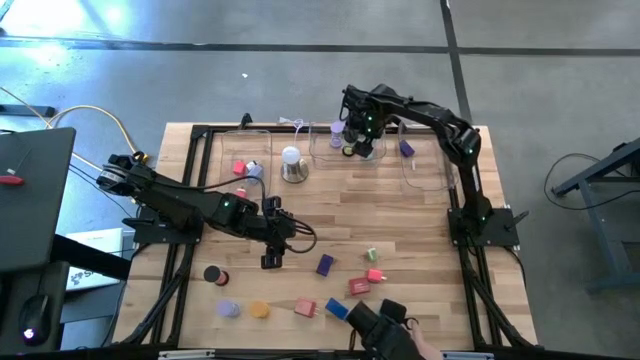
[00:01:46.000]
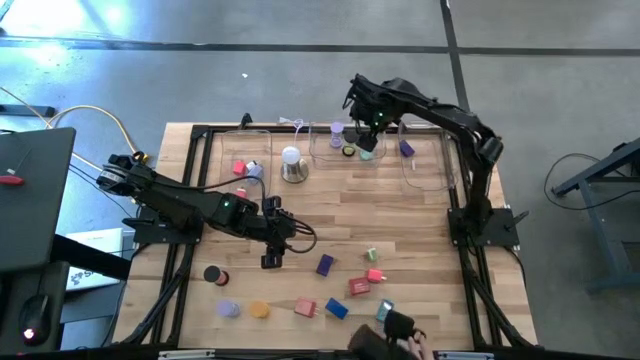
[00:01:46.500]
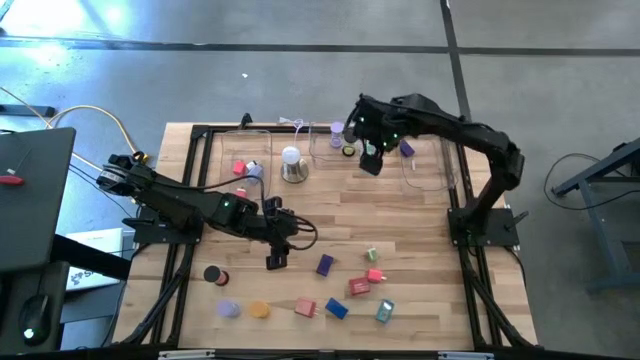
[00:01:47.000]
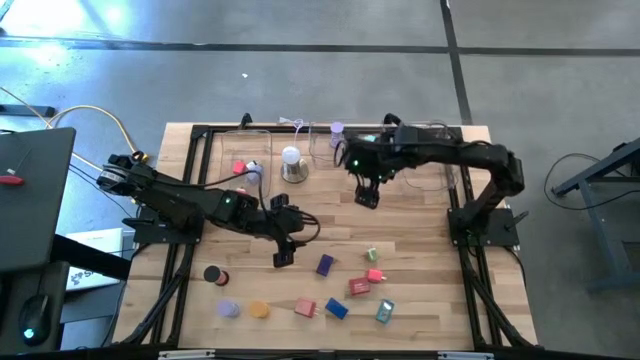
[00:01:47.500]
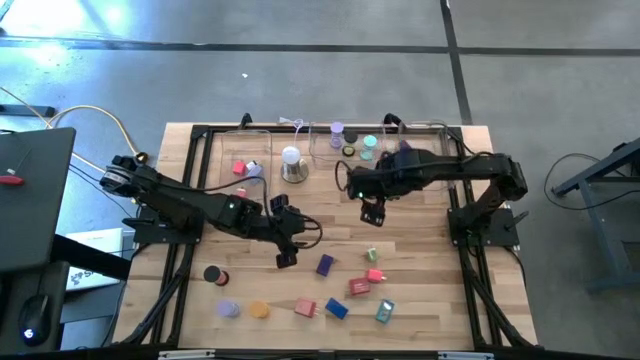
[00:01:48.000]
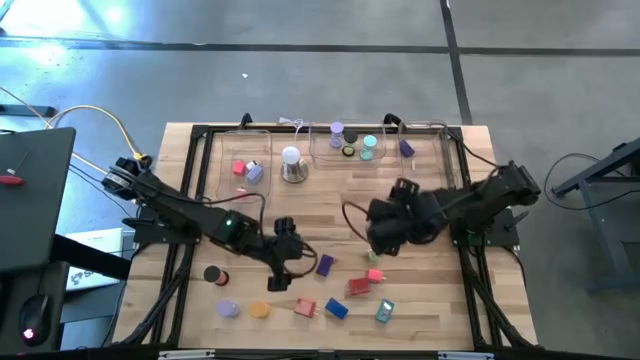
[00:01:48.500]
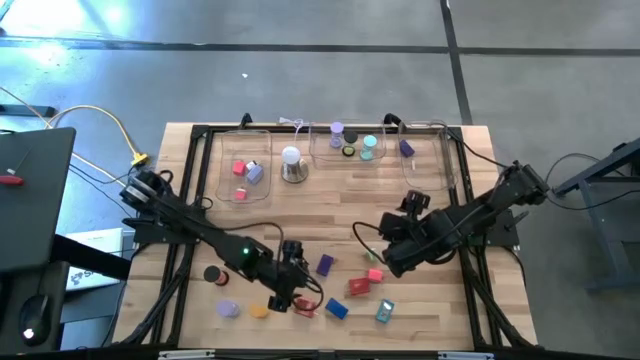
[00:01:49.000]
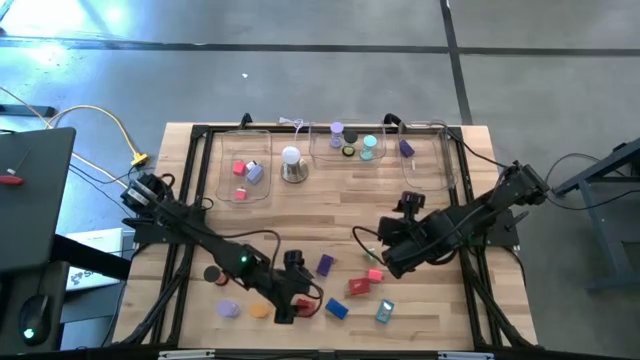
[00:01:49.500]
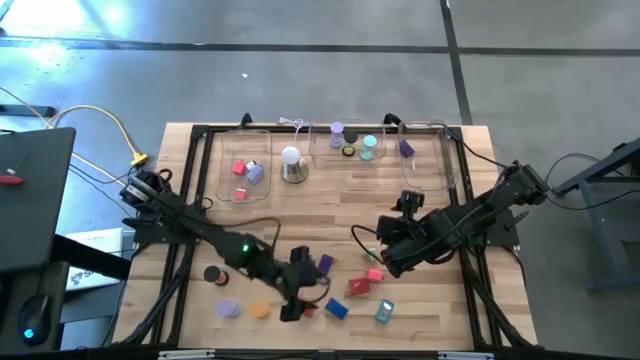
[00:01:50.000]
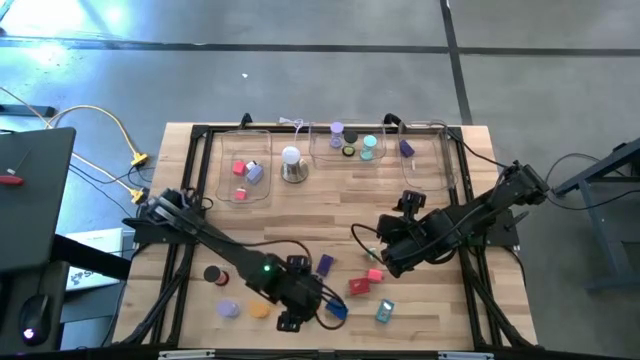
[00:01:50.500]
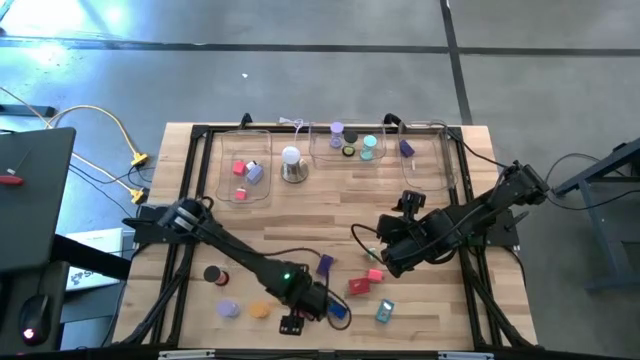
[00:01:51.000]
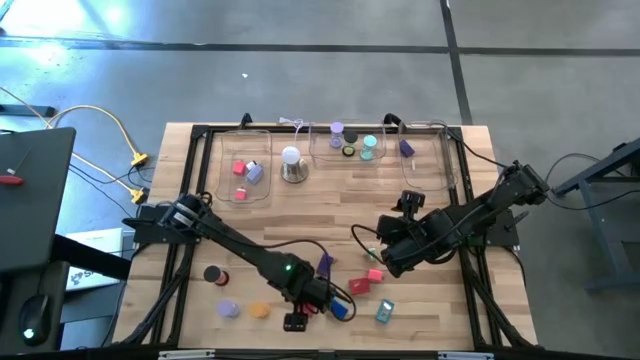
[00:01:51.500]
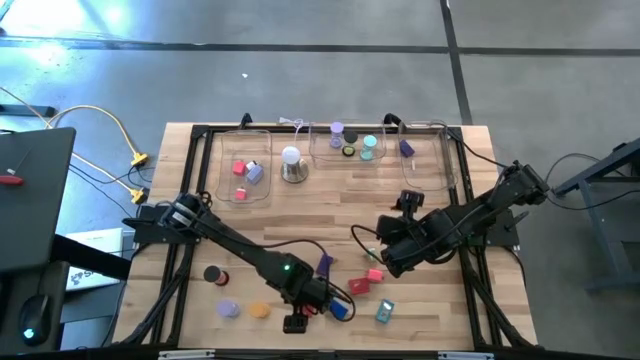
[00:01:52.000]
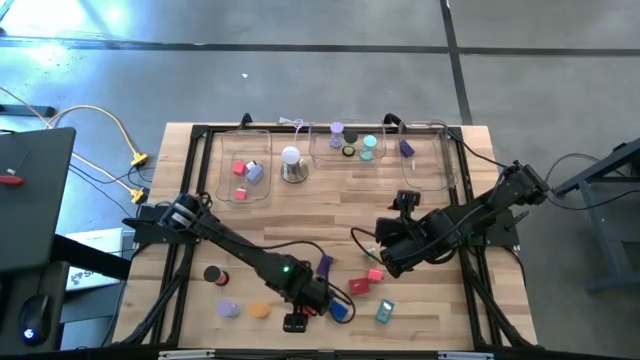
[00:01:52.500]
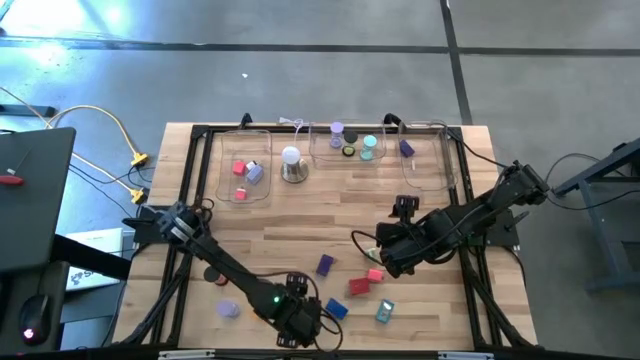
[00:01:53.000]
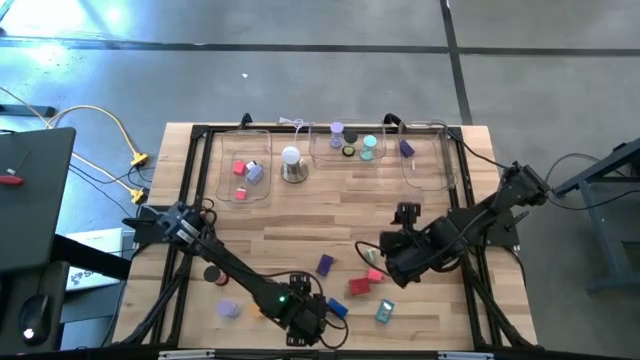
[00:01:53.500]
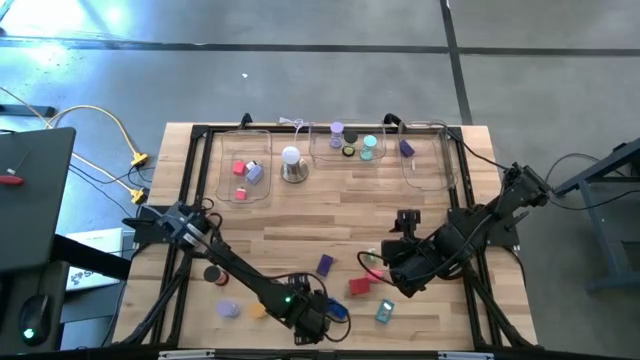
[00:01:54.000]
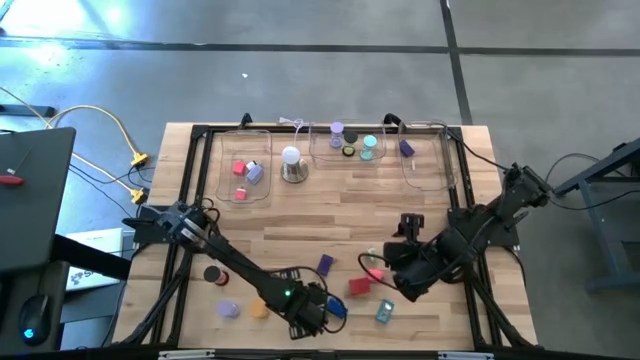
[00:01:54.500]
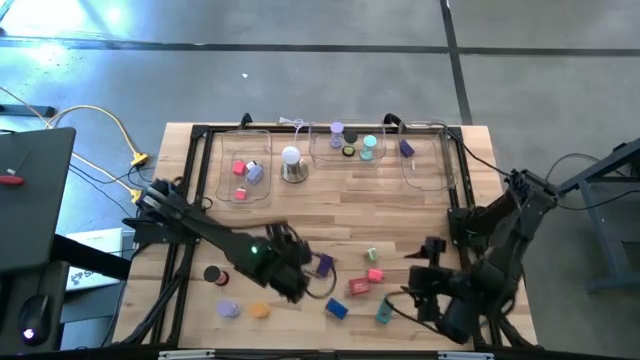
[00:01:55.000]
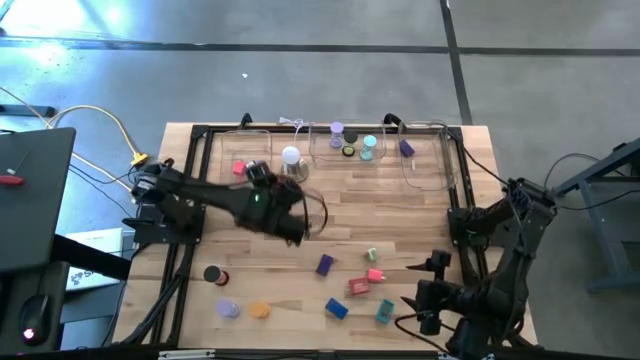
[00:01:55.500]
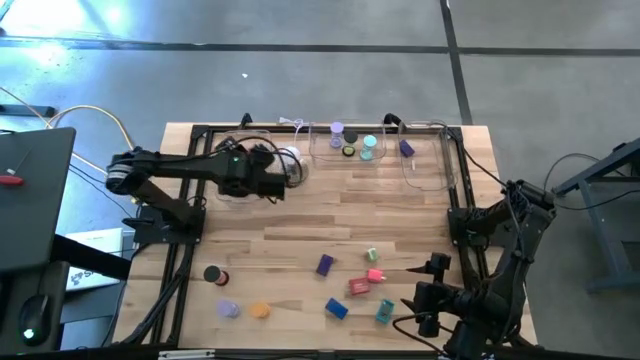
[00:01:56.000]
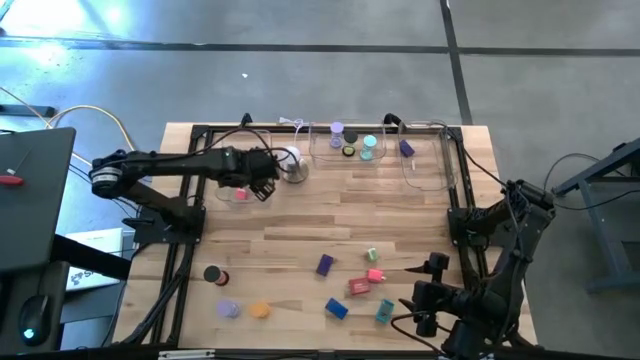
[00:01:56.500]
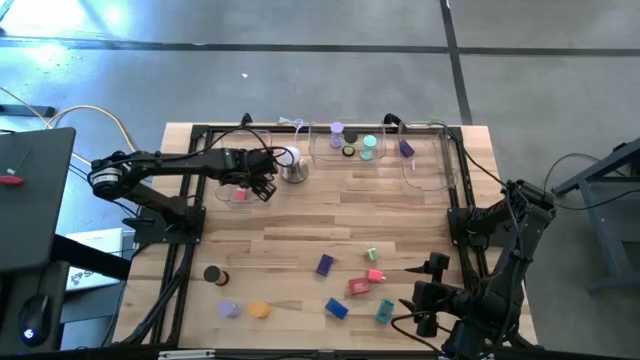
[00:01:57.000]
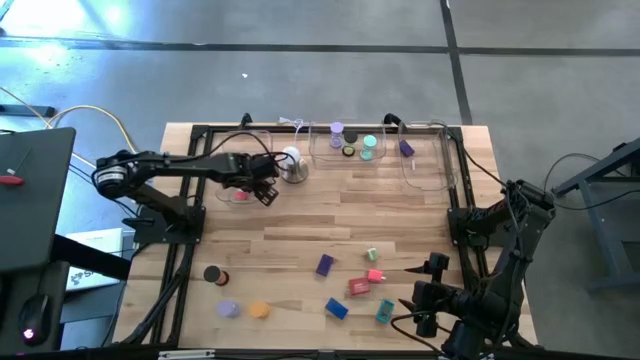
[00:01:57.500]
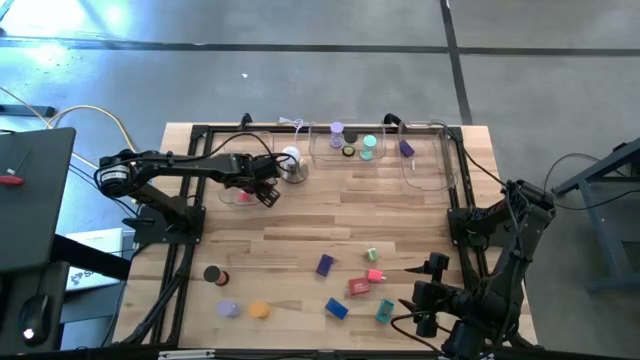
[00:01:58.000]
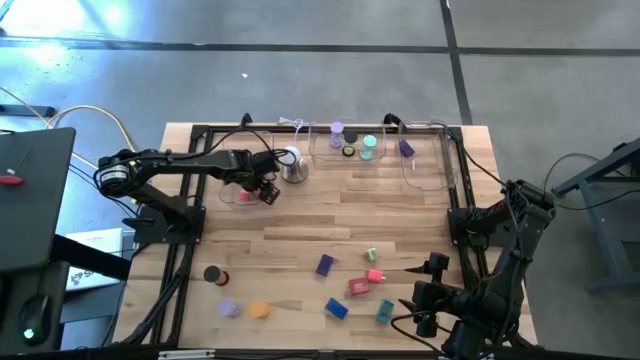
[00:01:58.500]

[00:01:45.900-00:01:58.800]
Task: Pick & Place Office items
Put the left red charger adapter into the left transparent bin

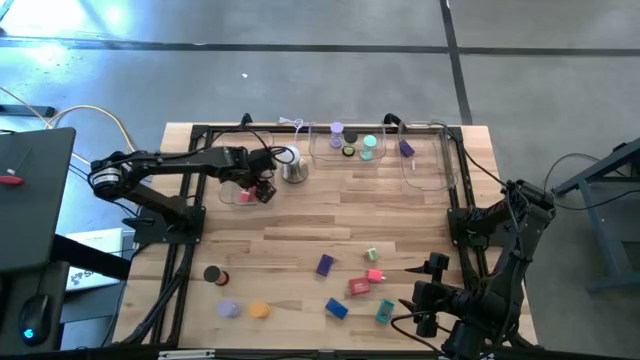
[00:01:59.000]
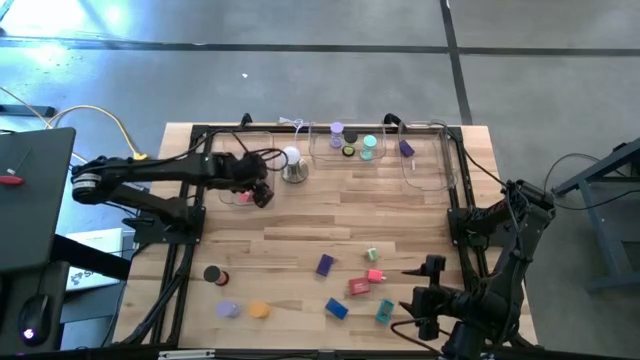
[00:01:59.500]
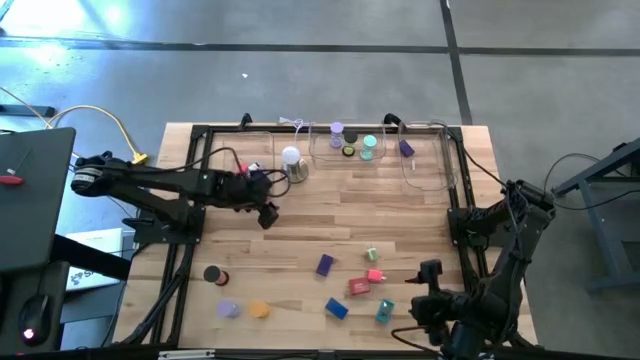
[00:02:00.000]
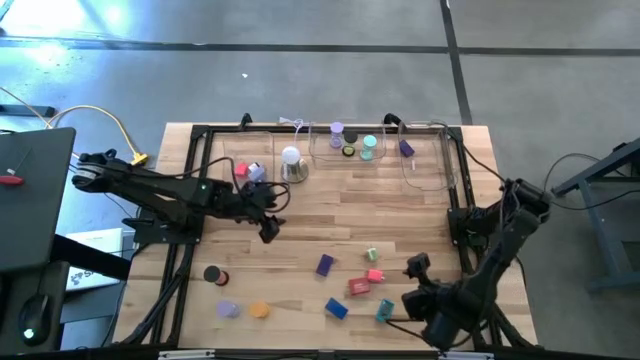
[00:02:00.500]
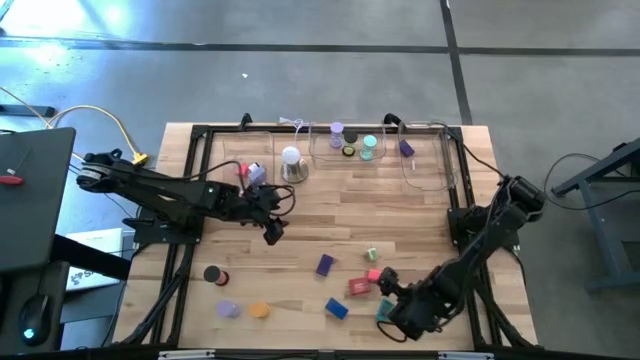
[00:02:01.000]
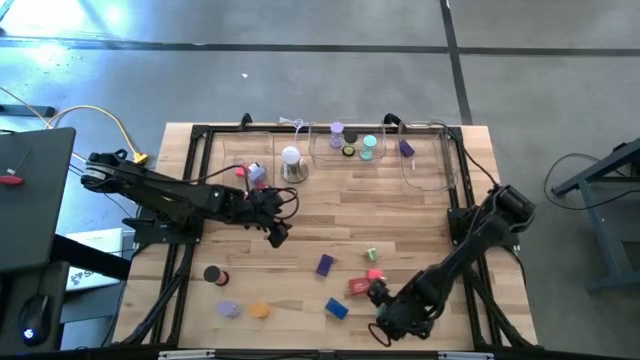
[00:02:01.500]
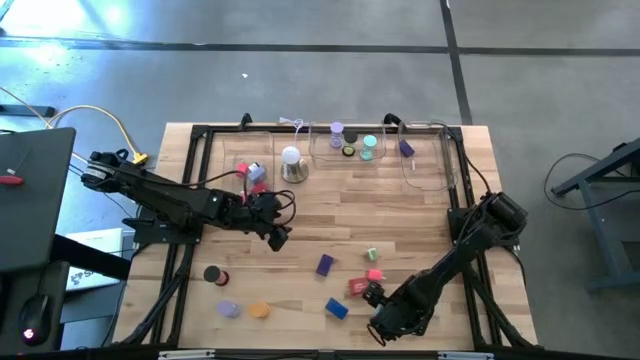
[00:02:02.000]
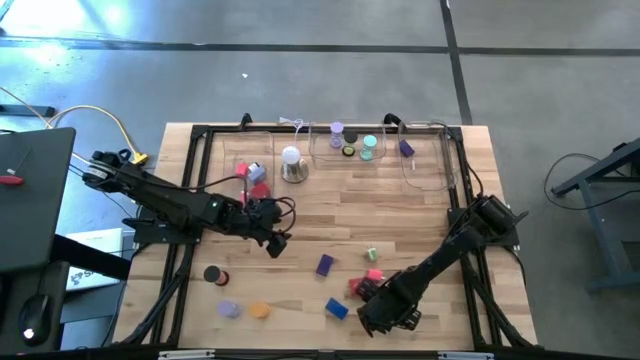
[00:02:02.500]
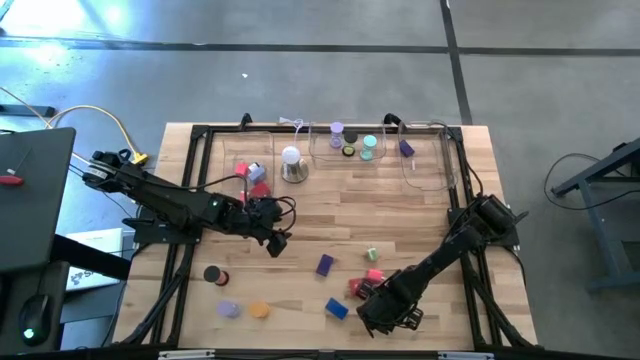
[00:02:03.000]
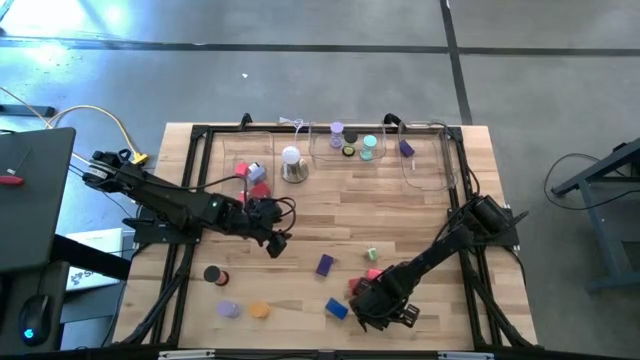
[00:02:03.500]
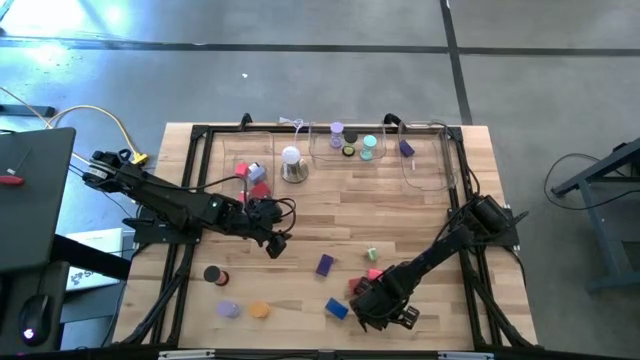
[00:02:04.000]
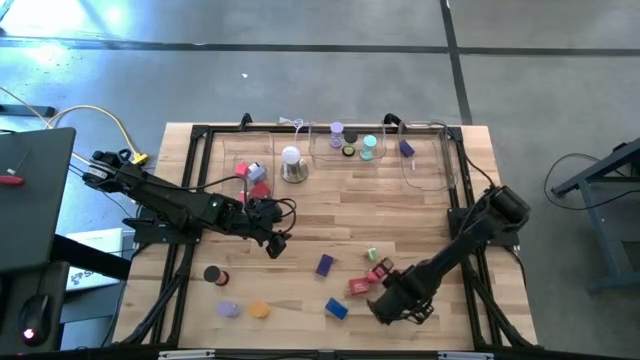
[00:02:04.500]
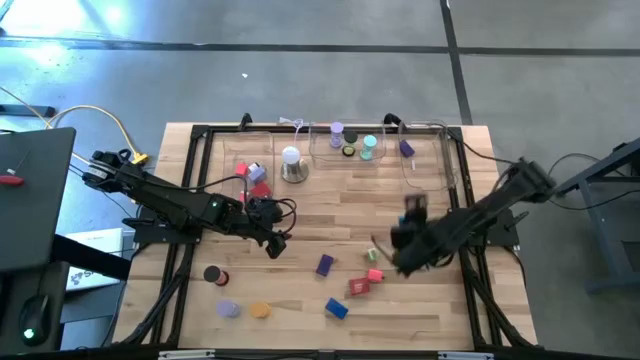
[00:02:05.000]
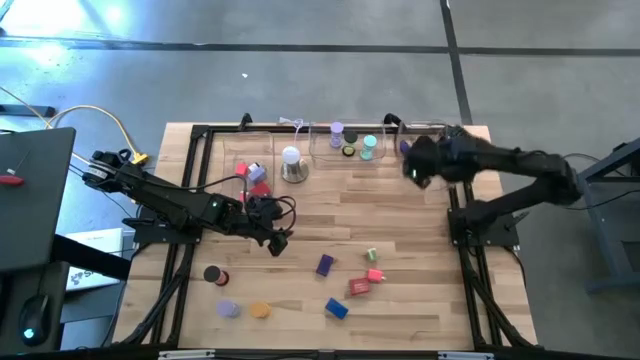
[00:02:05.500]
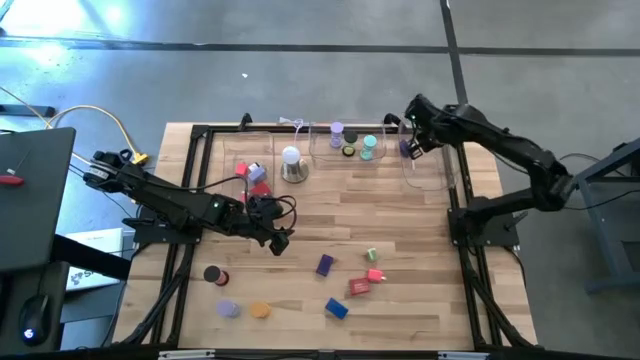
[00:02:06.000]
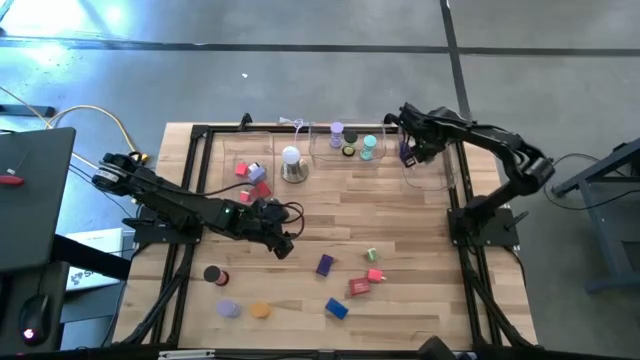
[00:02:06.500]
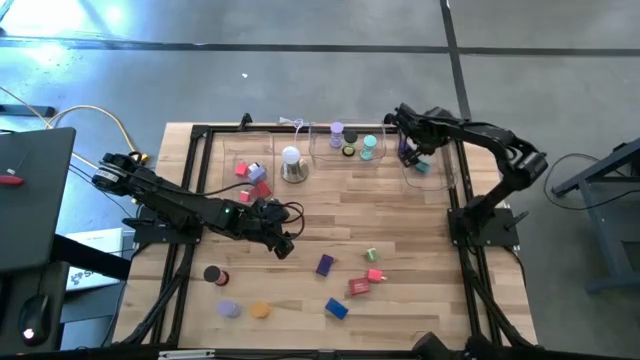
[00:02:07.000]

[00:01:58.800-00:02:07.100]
Put the light blue digital clock into the right transparent bin

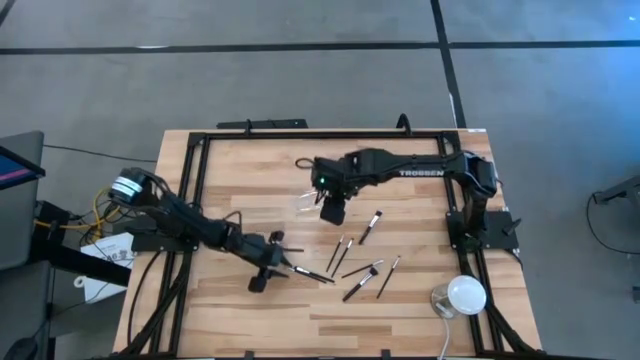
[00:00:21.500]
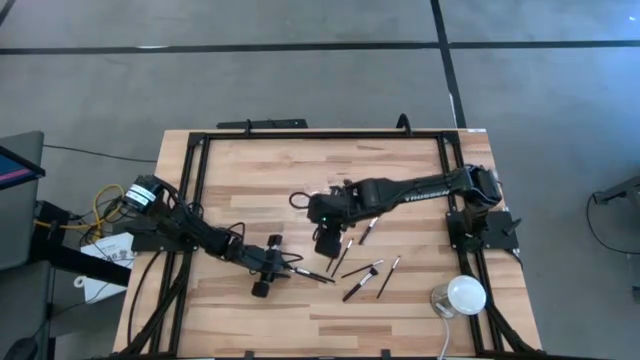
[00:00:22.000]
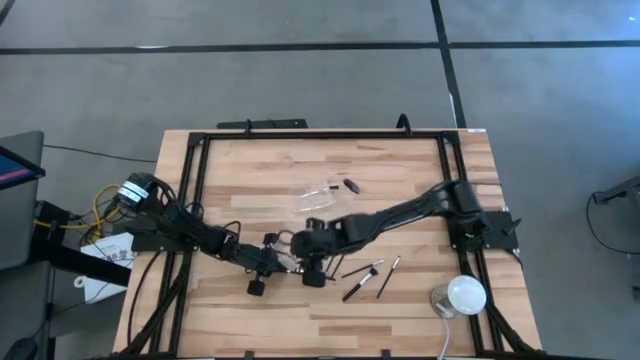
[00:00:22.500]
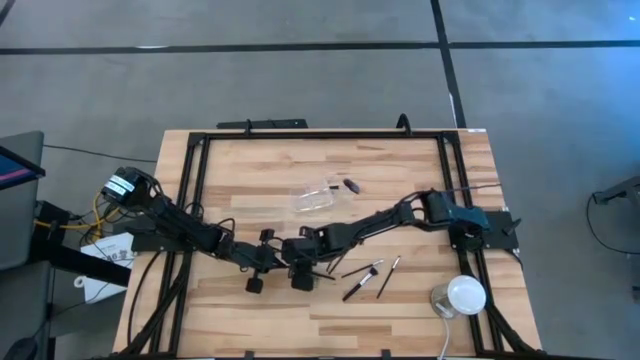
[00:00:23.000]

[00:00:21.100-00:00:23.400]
Task: Put items in baskets/containers
Put the eyeshadow brush into the transparent organizer
